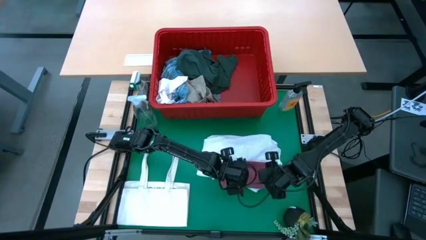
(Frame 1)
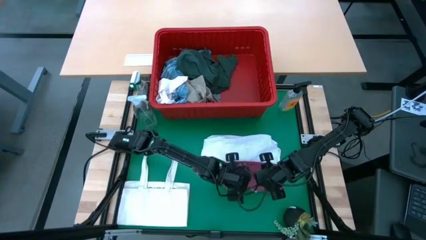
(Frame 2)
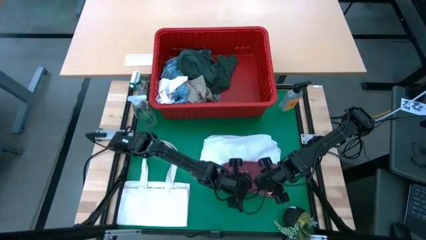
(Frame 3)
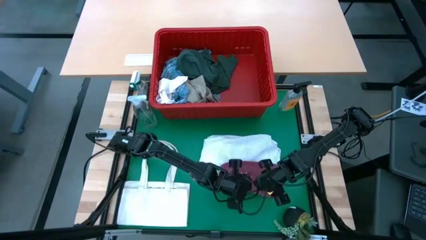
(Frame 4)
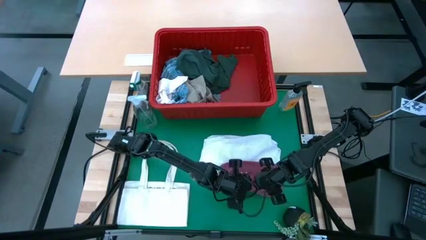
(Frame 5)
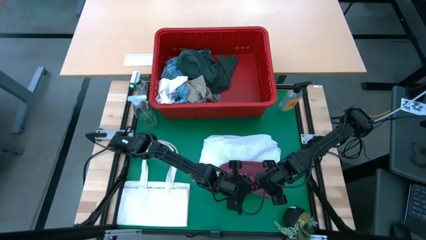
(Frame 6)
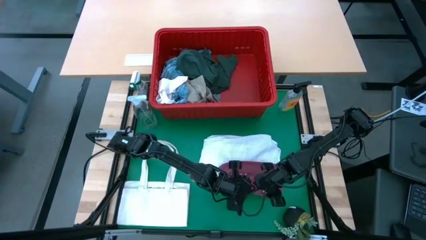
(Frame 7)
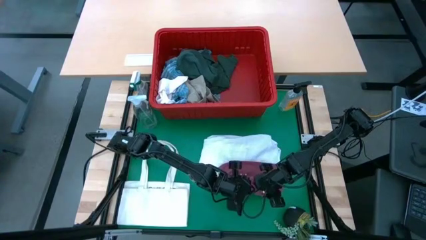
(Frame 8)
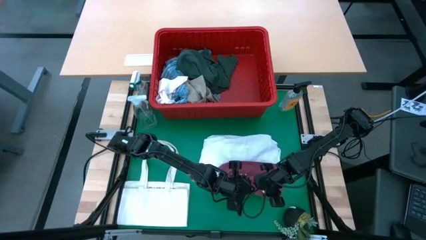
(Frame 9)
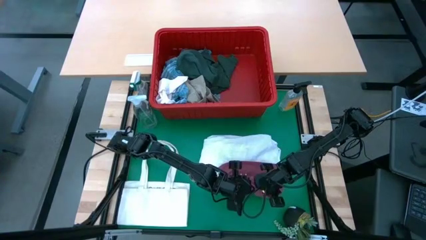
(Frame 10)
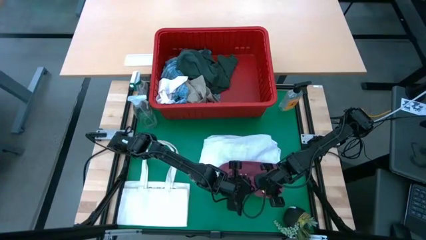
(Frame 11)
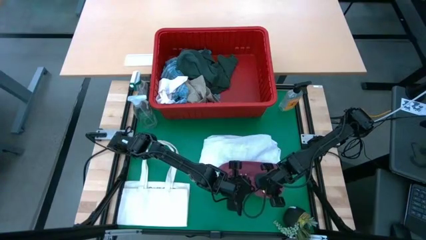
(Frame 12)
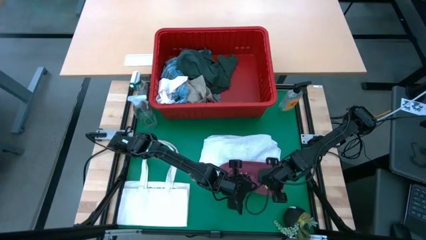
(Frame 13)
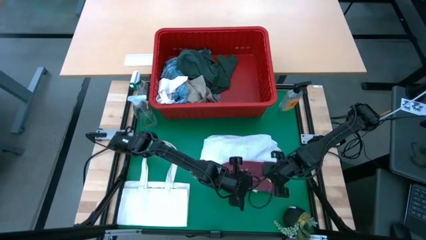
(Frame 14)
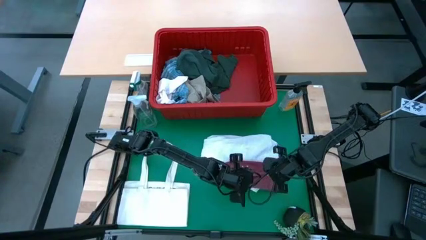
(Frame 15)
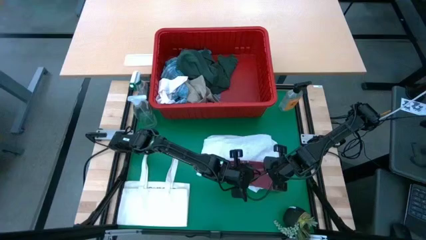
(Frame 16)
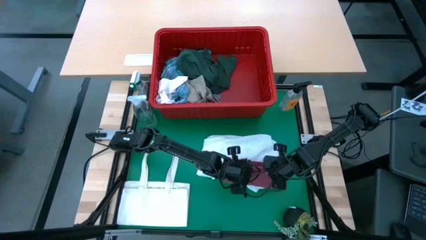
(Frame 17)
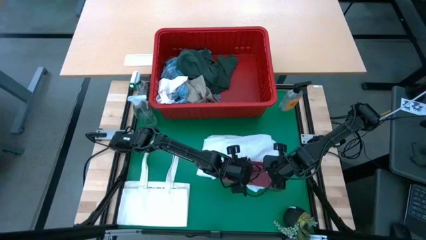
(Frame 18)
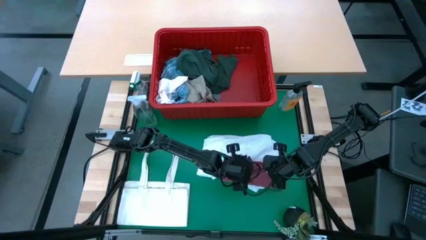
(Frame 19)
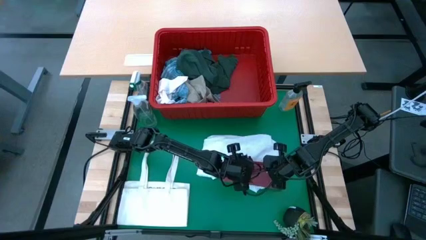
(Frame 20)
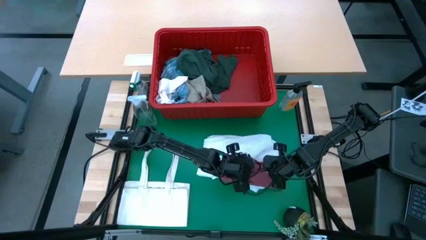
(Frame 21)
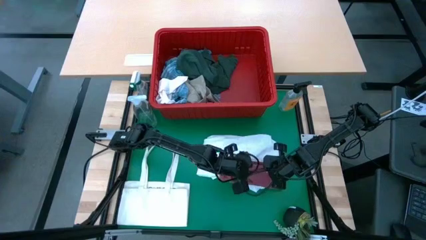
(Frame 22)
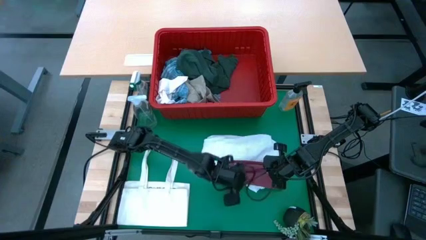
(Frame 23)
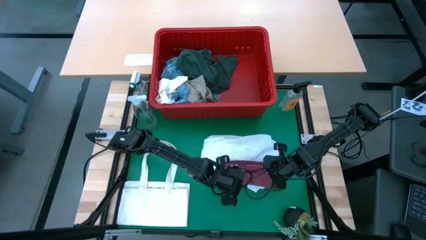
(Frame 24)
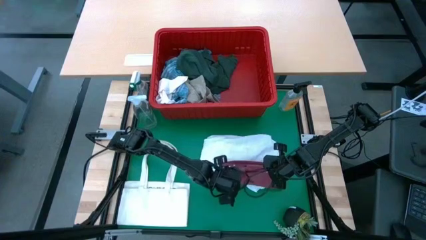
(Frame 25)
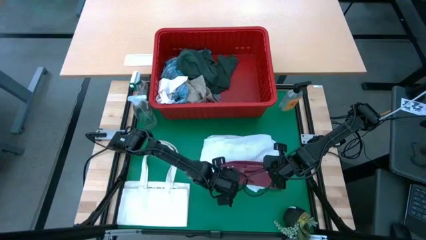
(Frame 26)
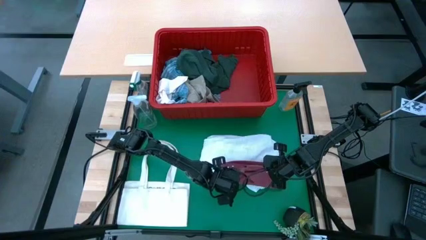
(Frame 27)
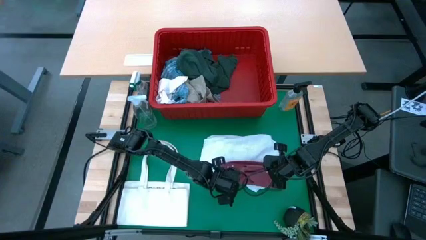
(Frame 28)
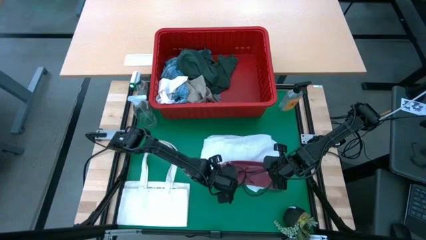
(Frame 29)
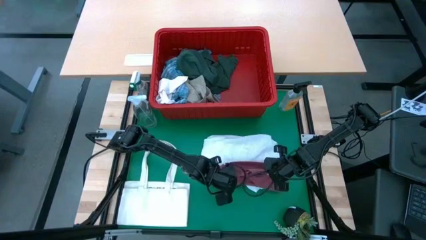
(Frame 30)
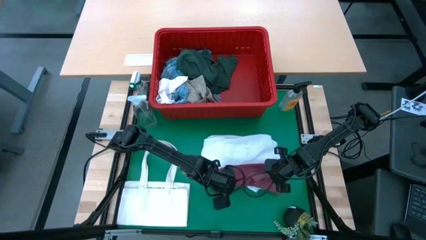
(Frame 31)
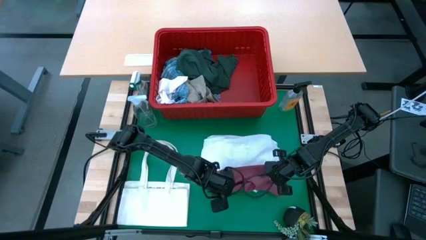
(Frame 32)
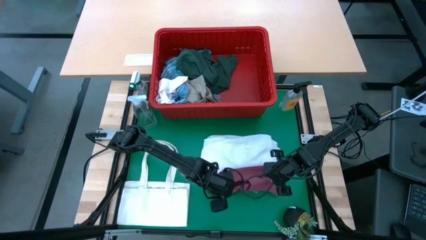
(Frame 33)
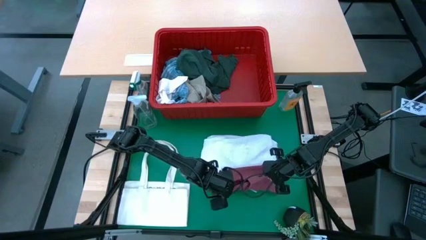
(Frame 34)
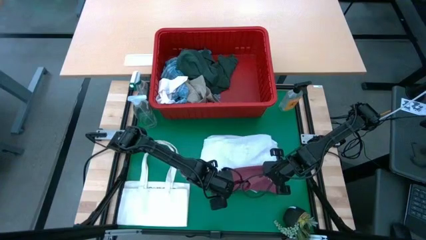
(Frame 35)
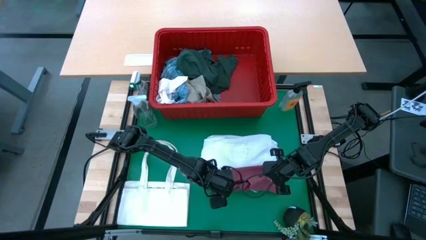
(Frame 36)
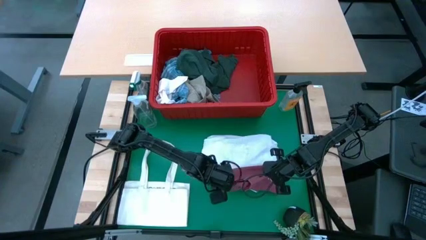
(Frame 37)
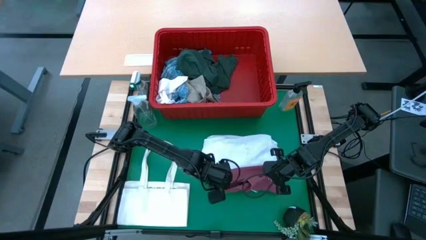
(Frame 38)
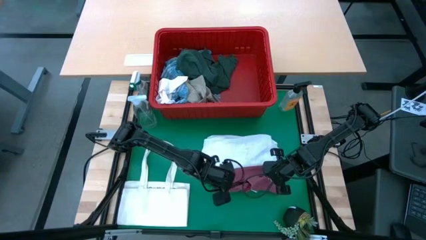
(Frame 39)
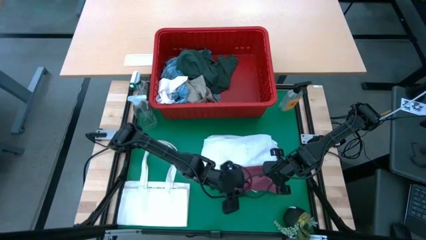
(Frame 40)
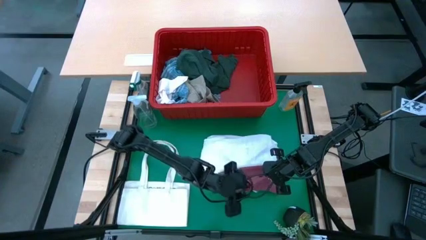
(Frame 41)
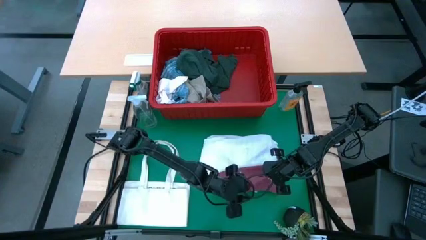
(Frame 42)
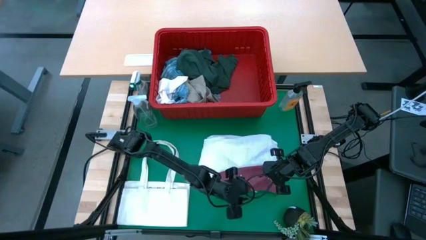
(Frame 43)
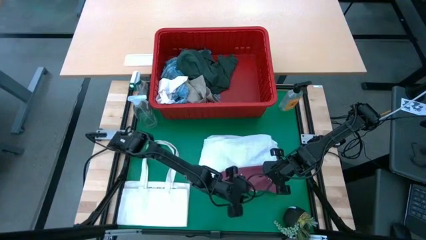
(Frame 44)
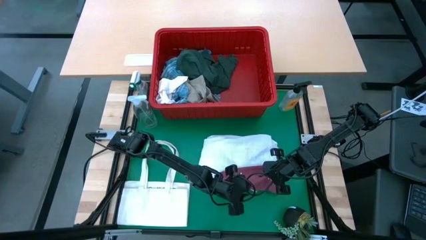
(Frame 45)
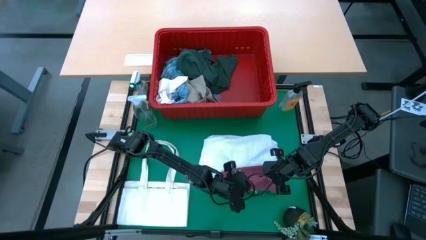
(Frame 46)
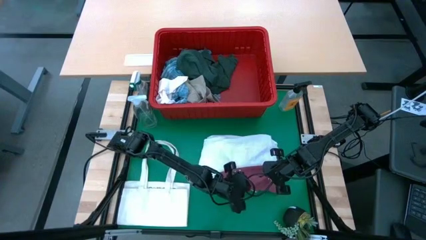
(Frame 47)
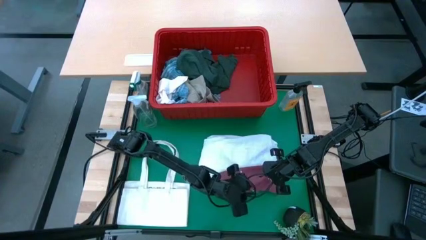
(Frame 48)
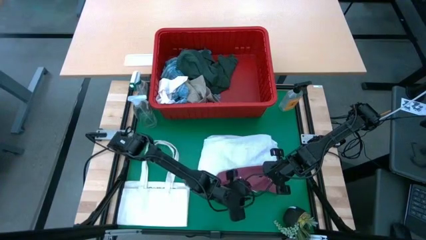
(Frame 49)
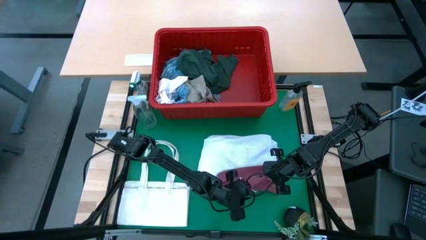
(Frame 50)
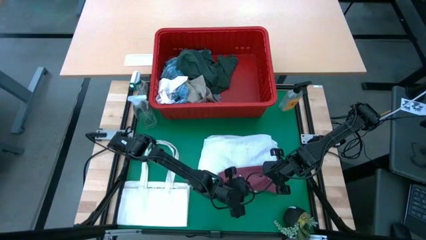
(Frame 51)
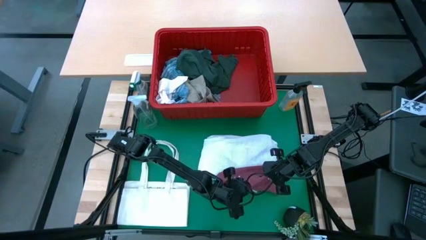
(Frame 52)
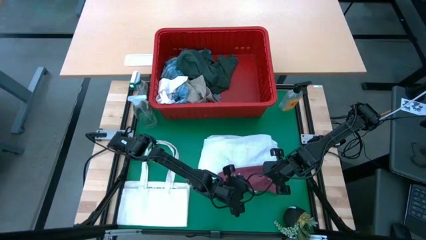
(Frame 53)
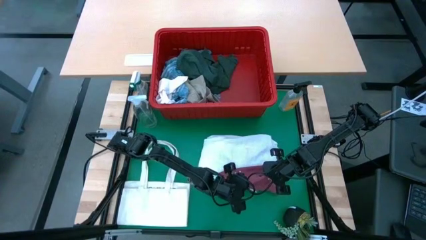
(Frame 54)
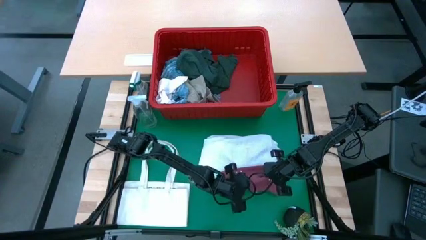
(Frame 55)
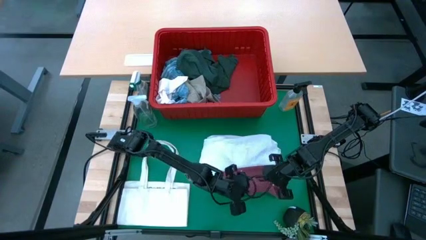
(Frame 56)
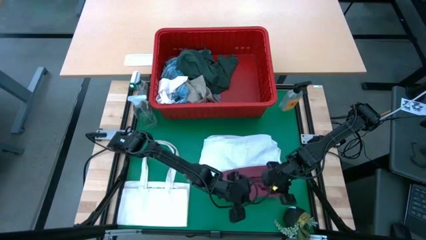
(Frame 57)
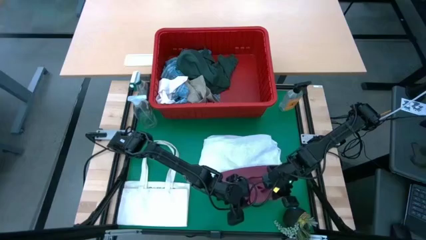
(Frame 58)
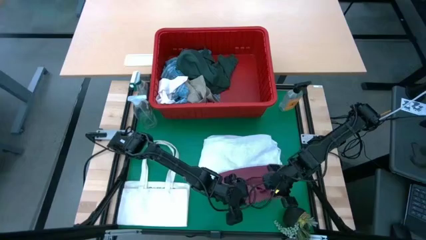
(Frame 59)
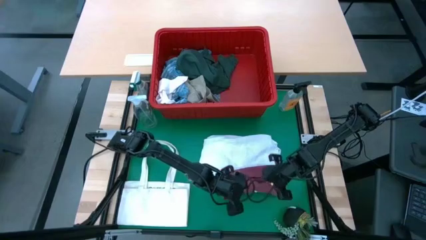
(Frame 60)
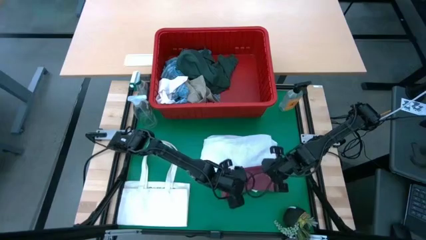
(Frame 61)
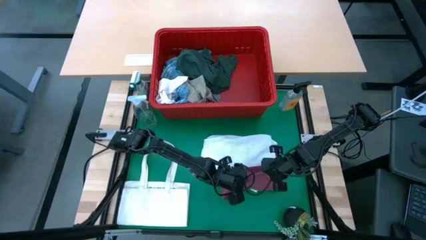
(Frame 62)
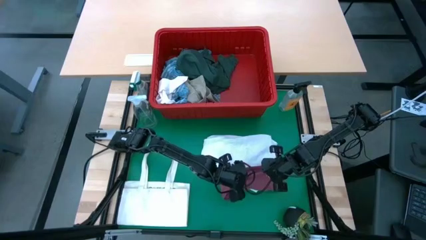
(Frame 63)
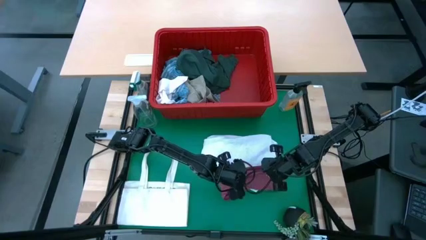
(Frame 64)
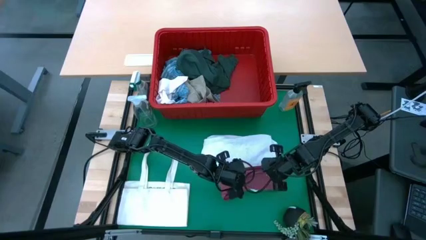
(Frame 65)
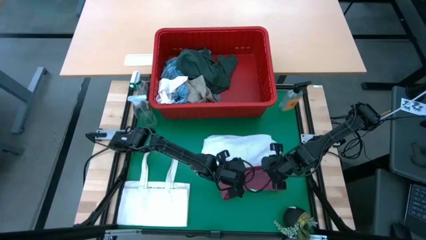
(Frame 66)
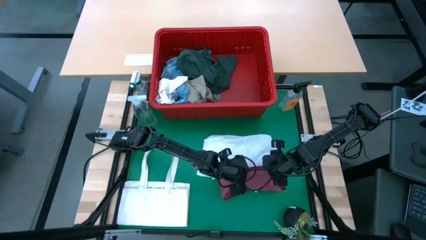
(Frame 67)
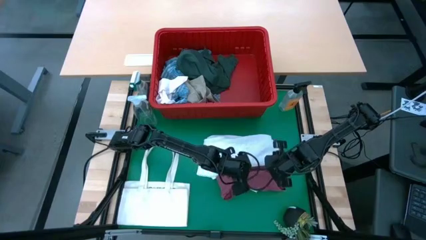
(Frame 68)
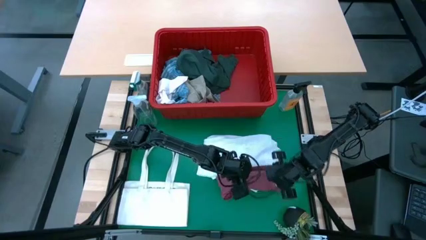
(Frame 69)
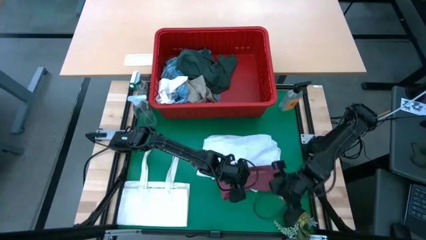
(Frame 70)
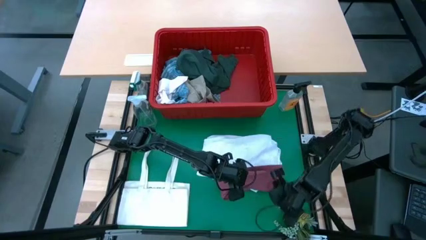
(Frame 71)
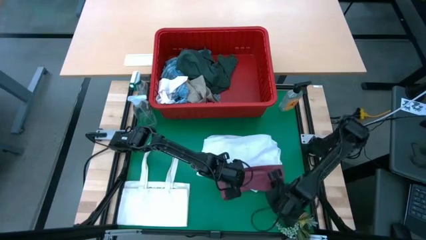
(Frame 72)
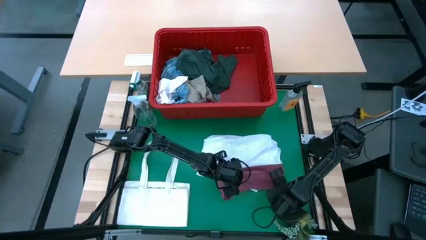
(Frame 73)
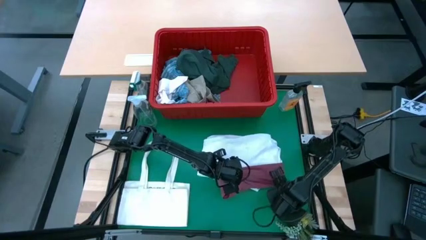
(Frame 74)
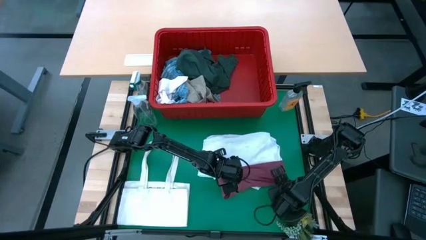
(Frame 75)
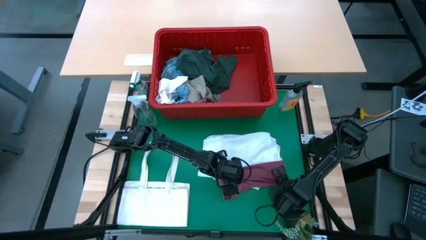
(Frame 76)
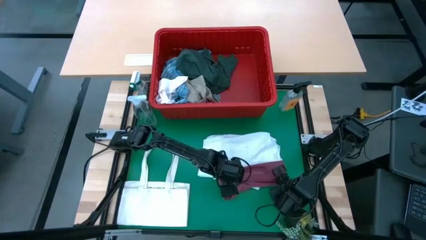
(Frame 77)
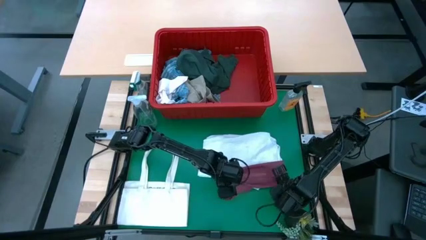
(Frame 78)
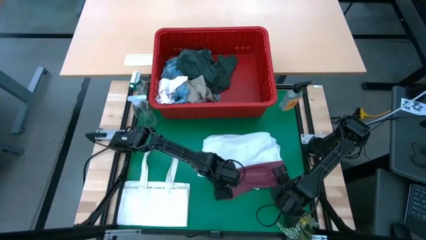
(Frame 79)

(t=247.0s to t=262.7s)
Task: Fold Laundry from Bin
Fold the pink underwear
